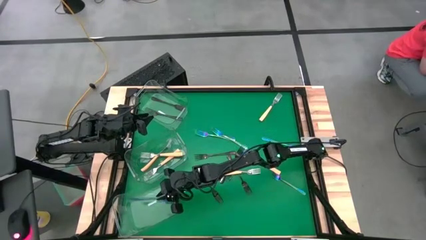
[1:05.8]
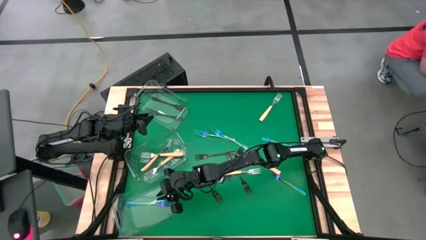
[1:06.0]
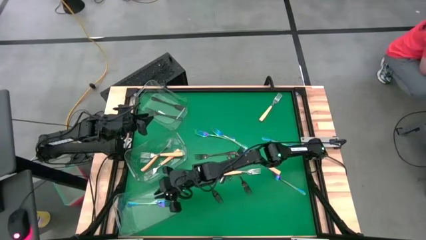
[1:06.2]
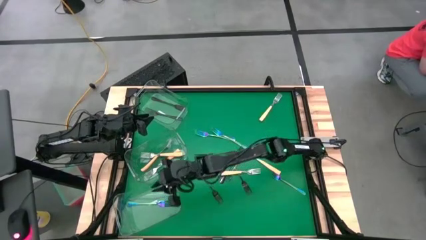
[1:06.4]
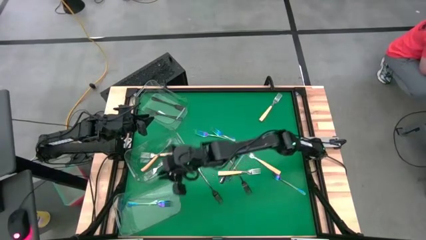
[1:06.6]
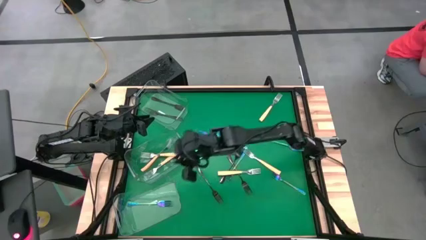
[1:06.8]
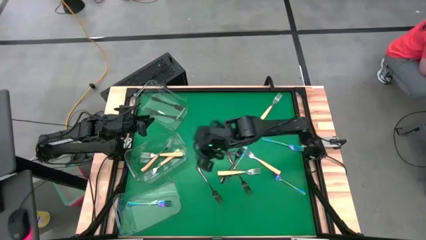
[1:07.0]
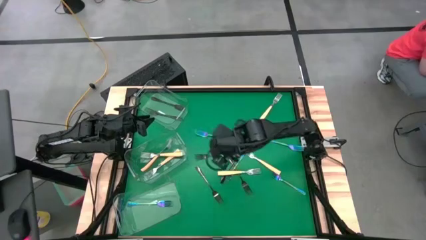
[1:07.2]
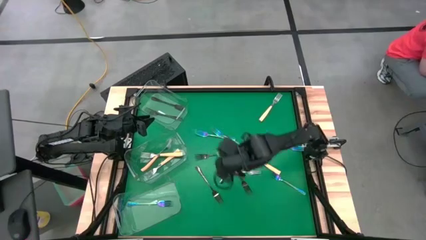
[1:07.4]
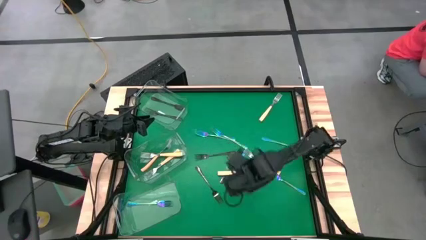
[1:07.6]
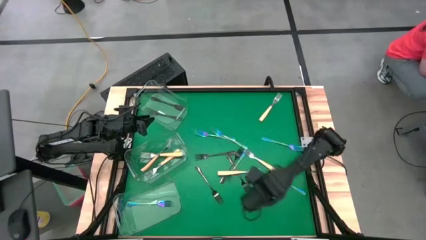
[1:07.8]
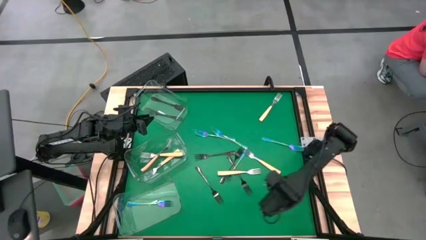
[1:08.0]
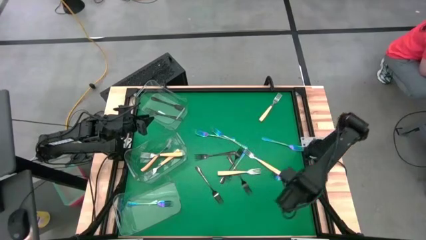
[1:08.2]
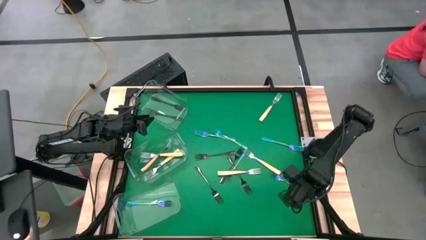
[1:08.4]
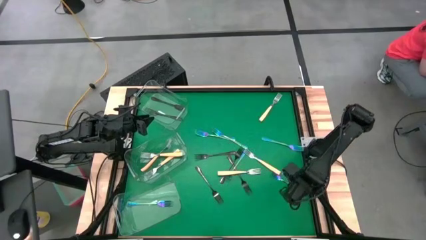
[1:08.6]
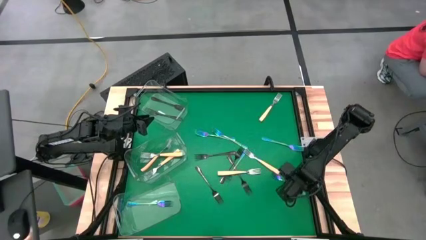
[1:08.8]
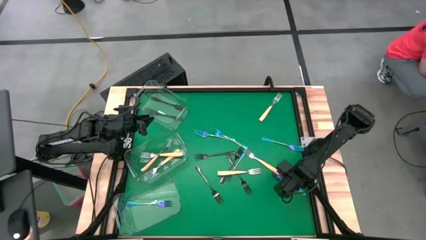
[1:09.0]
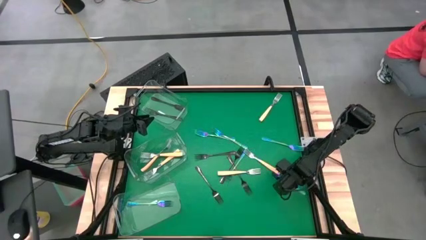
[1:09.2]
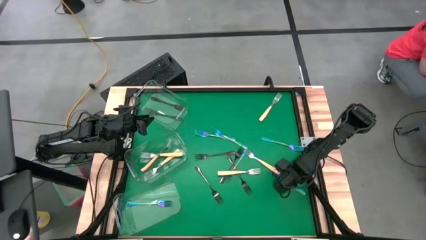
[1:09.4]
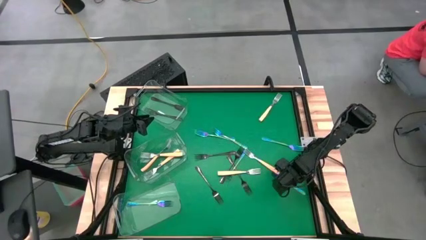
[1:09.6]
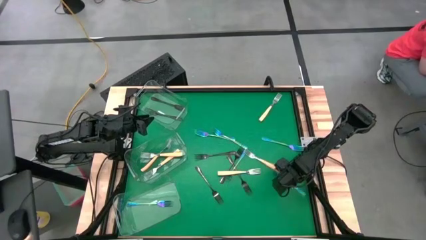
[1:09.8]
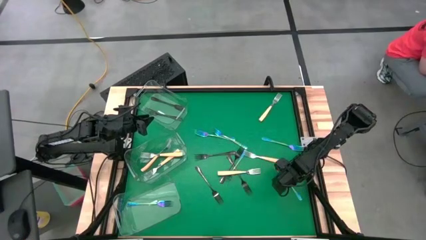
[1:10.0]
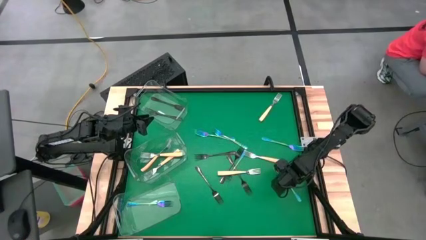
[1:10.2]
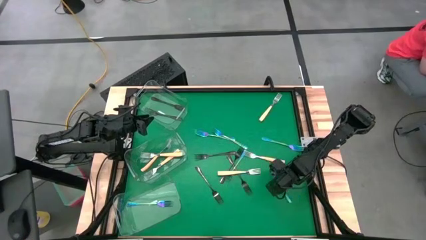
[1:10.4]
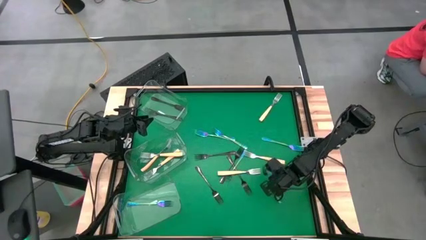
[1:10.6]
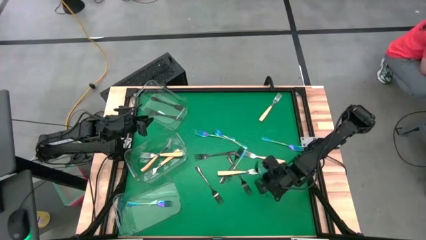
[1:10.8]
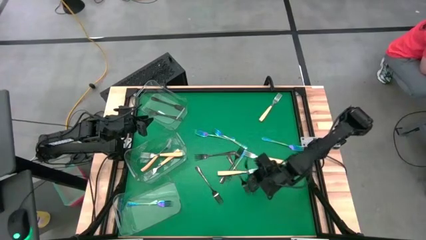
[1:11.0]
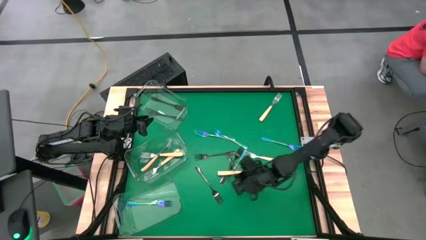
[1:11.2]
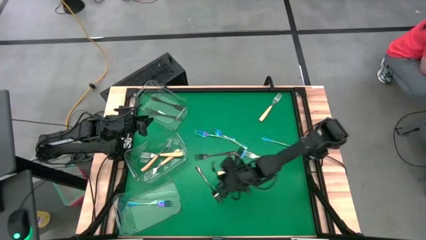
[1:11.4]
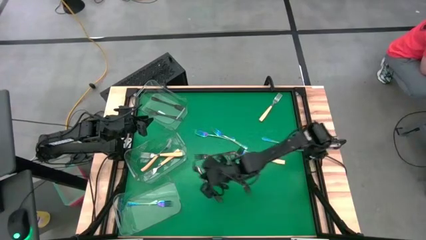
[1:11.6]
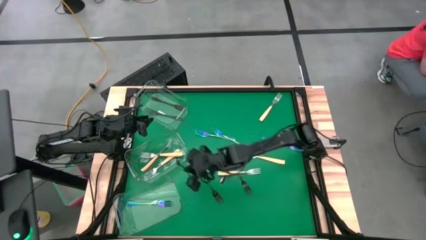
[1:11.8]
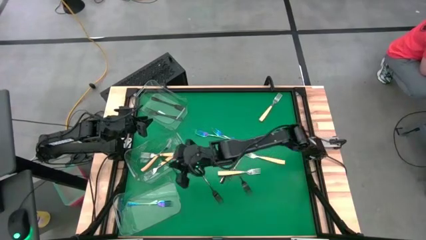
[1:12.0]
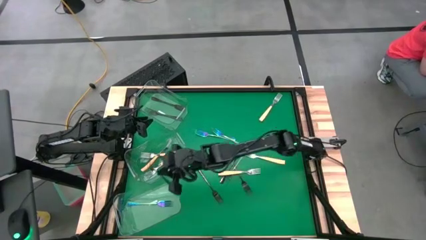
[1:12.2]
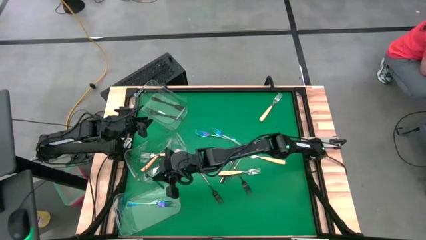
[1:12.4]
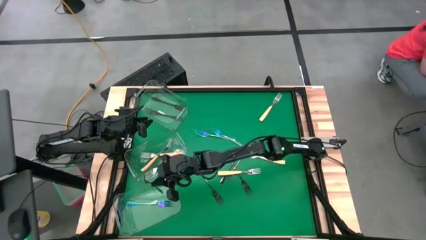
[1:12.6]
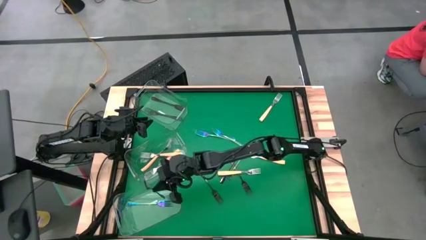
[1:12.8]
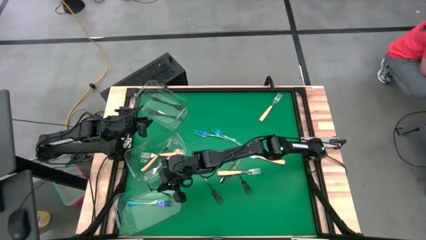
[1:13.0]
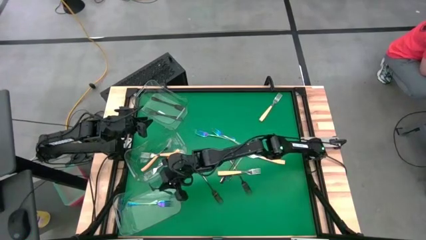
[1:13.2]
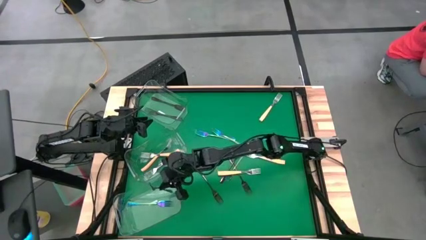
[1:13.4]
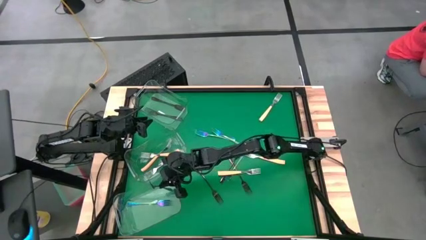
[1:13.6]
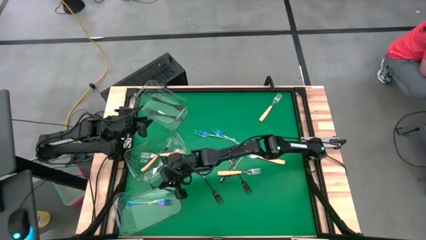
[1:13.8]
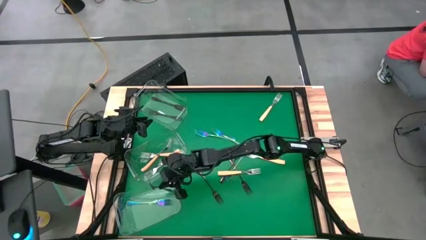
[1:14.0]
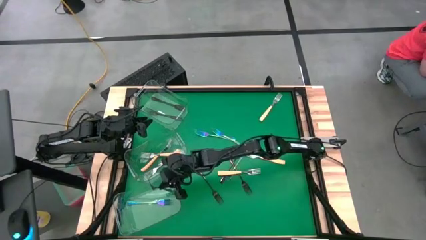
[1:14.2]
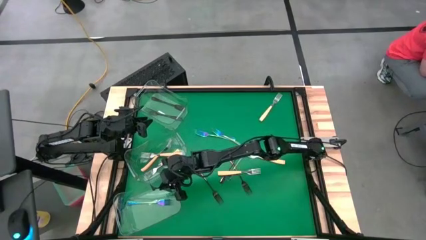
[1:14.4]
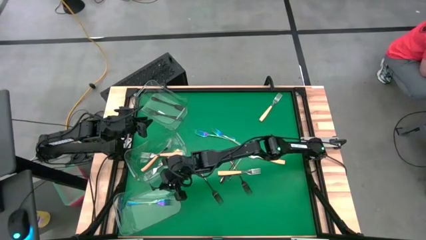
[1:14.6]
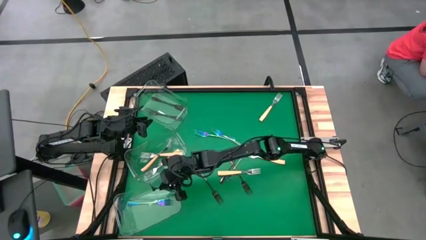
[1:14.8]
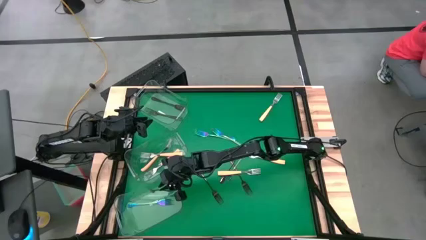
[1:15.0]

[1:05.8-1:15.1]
Task: Sort silverware by color (type)
Put the blue fork into the bottom transparent bin

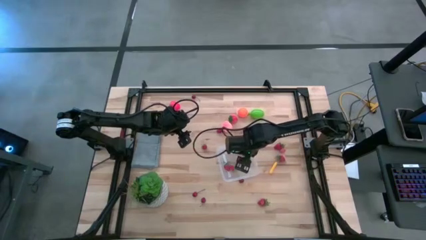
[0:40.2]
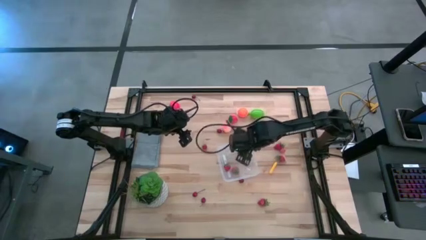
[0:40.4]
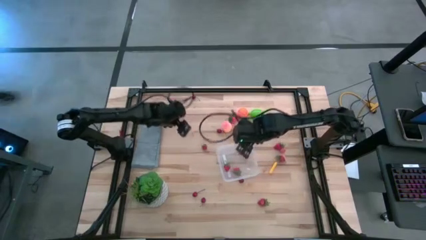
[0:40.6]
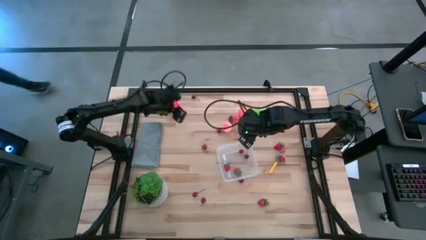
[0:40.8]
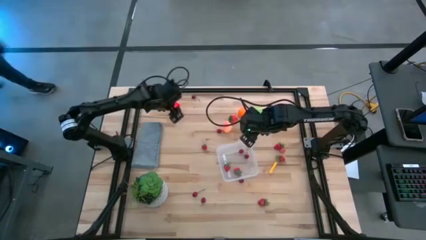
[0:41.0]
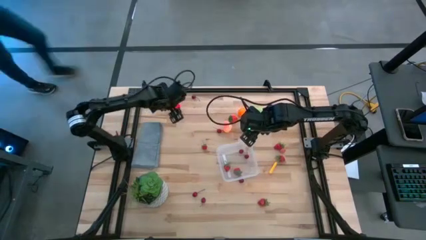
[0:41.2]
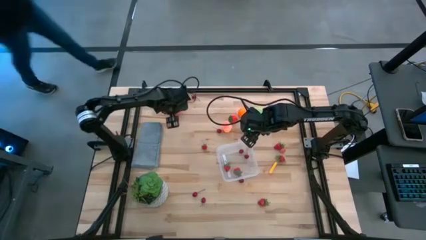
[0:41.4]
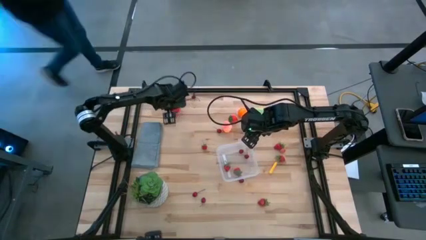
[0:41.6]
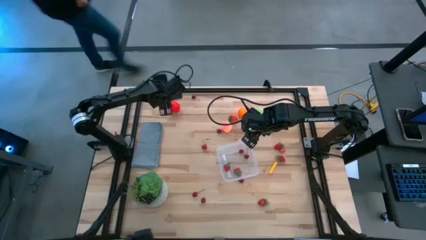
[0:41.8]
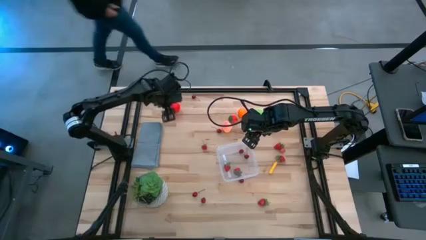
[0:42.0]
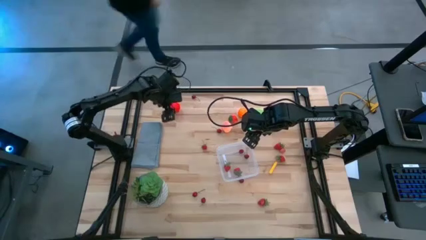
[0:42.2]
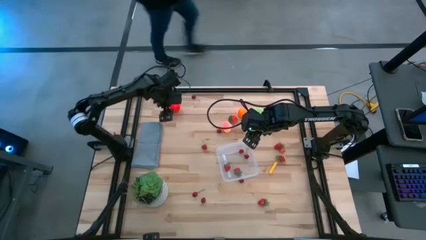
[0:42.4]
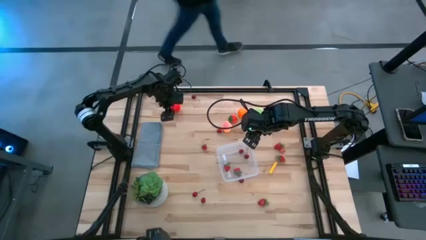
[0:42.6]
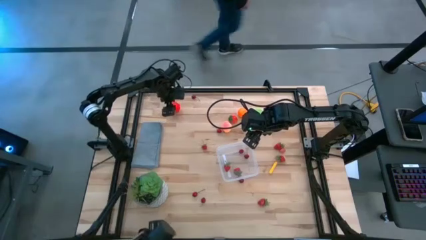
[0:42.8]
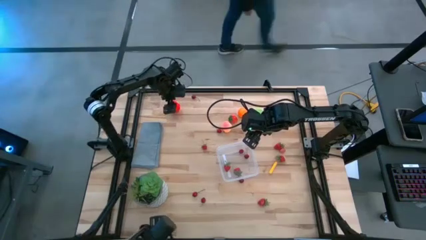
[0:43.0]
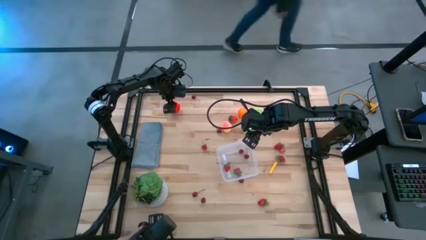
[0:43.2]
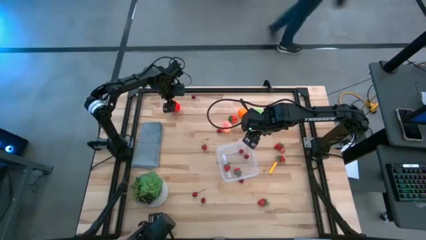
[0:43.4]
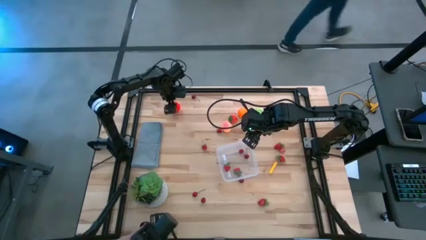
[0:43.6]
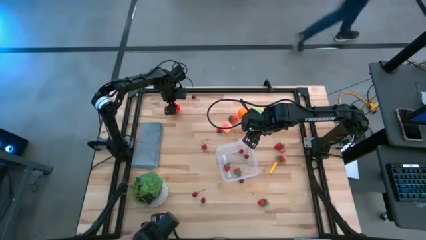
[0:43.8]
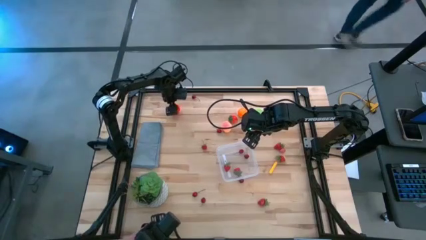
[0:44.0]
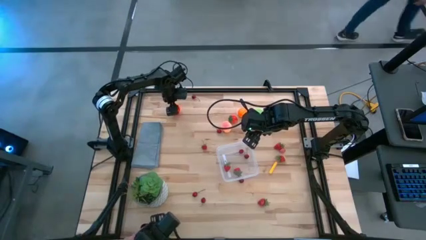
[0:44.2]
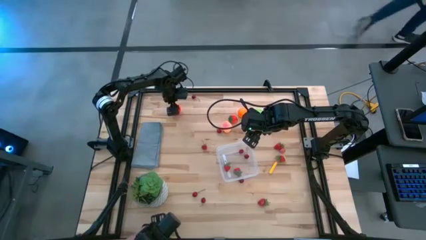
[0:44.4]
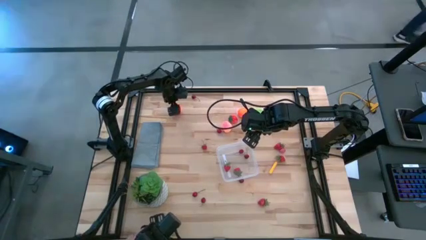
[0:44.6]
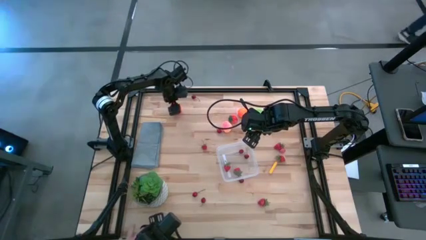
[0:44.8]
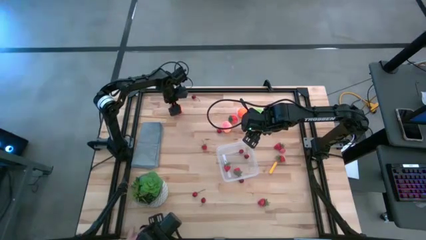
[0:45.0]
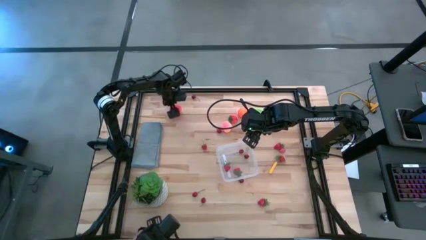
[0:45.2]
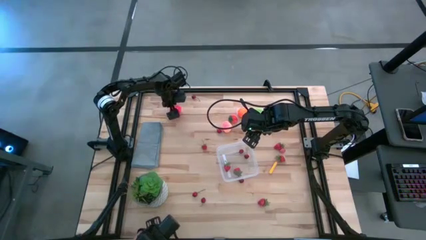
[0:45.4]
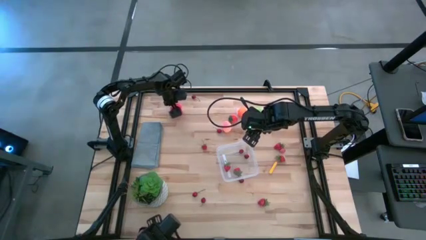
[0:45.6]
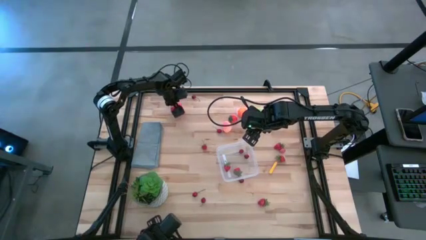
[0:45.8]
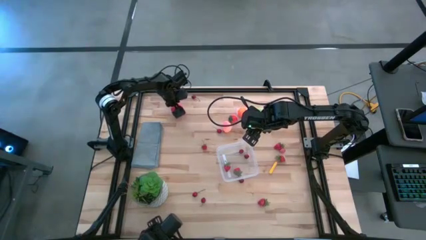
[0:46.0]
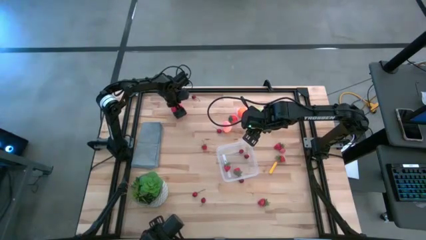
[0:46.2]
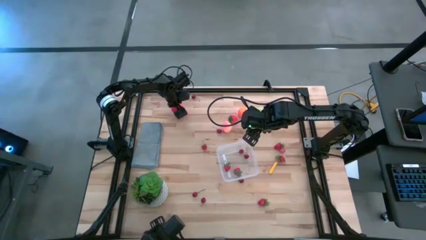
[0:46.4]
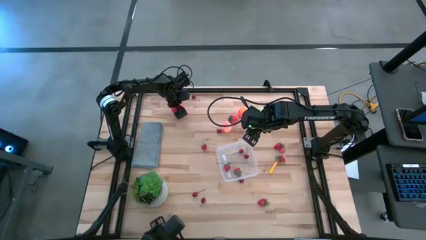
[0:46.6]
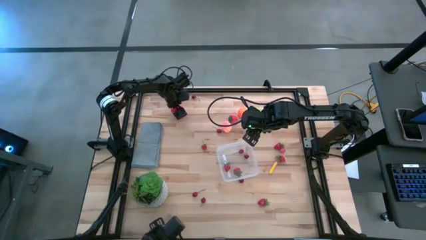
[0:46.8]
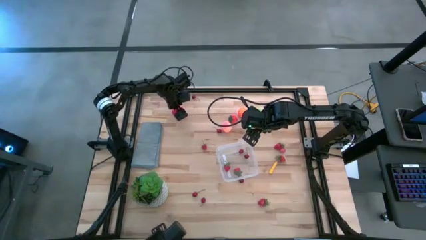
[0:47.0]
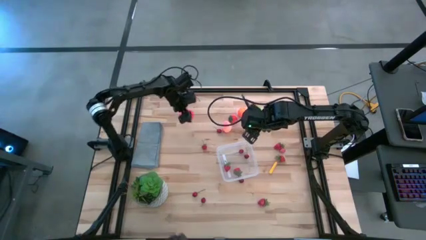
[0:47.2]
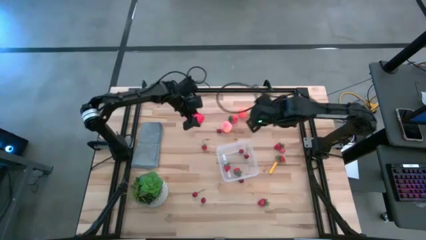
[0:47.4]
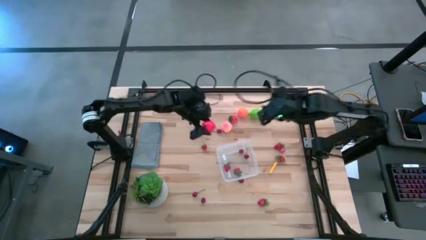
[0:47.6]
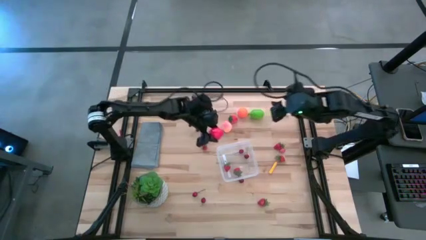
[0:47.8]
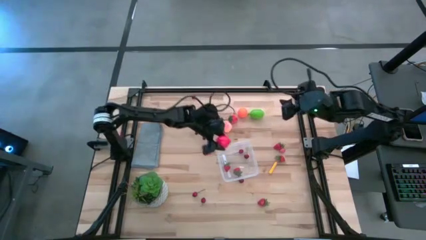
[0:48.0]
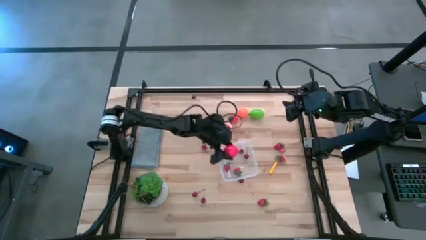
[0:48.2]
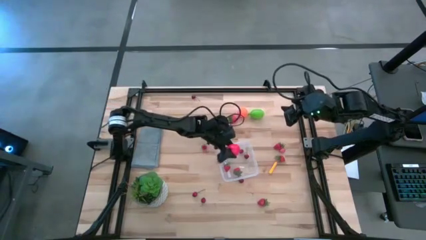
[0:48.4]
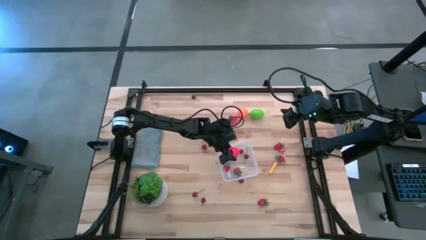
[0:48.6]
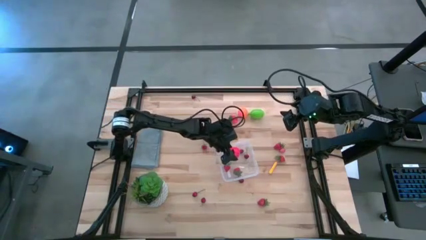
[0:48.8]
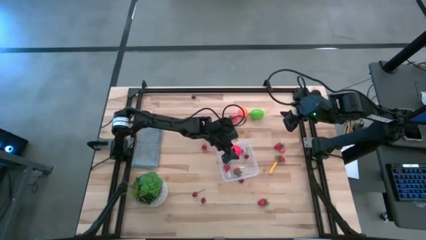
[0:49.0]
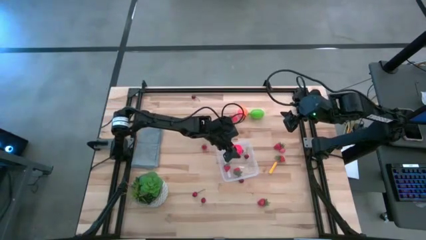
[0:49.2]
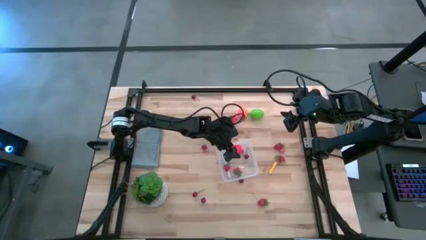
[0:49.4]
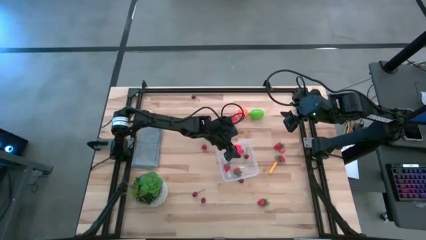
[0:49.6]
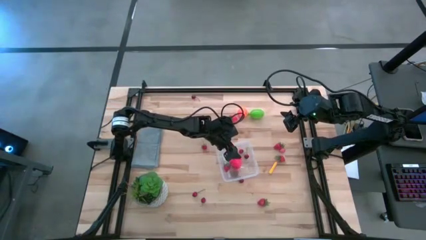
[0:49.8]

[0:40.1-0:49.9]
Task: Pick and placing Produce into tupperware
Put the apple into the transparent bin
